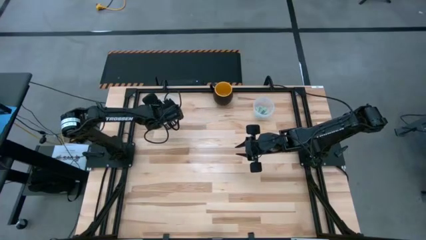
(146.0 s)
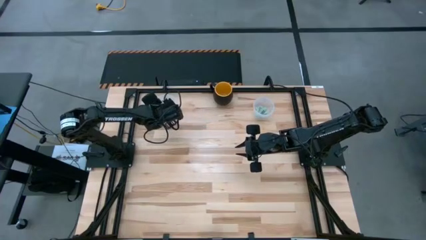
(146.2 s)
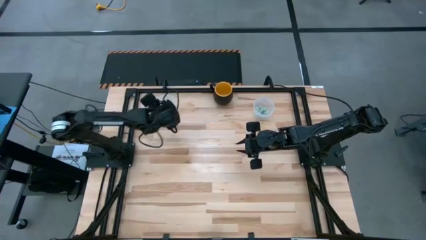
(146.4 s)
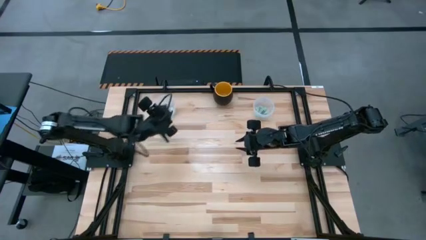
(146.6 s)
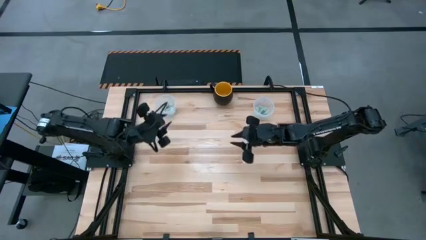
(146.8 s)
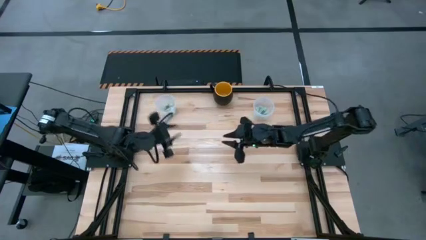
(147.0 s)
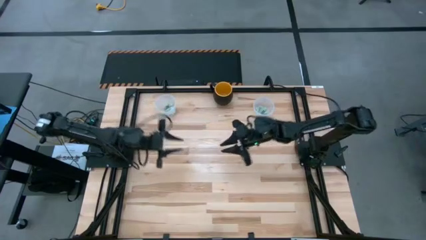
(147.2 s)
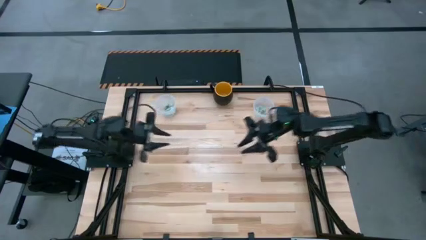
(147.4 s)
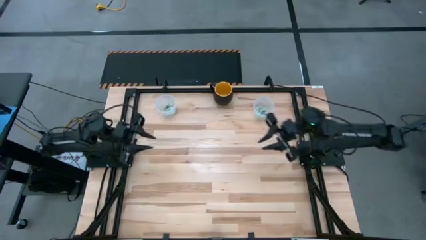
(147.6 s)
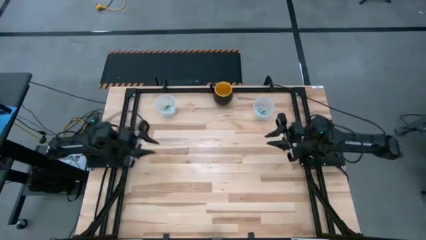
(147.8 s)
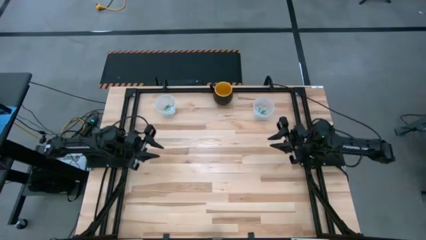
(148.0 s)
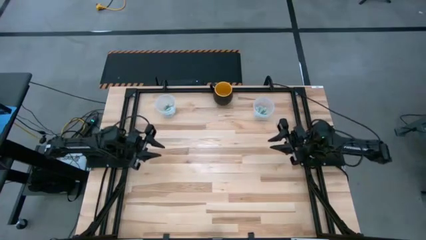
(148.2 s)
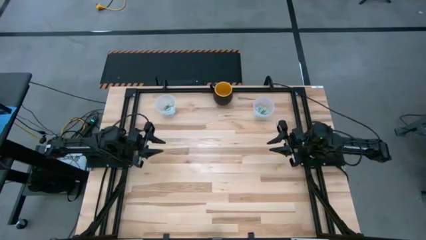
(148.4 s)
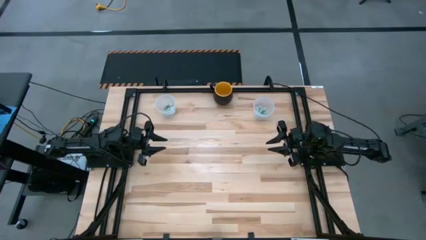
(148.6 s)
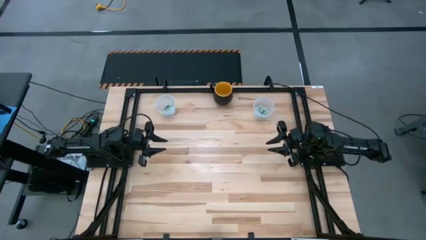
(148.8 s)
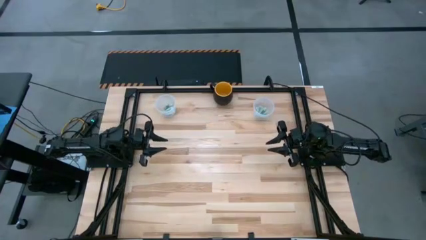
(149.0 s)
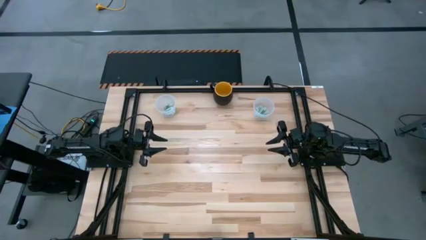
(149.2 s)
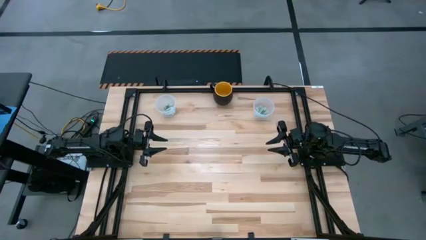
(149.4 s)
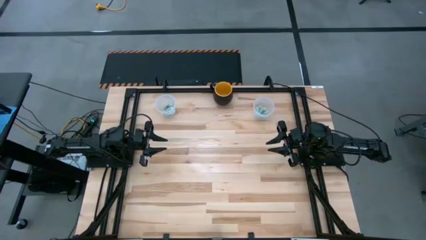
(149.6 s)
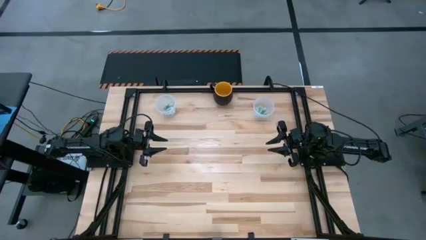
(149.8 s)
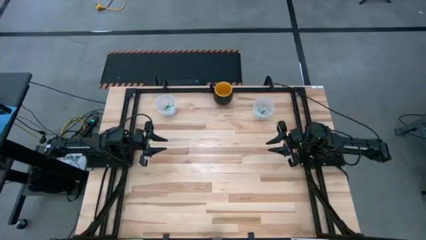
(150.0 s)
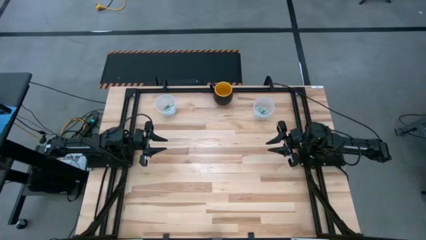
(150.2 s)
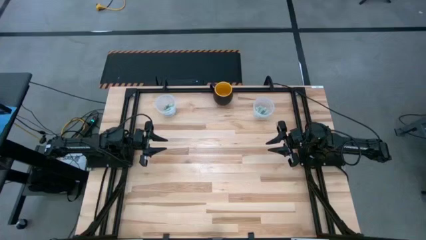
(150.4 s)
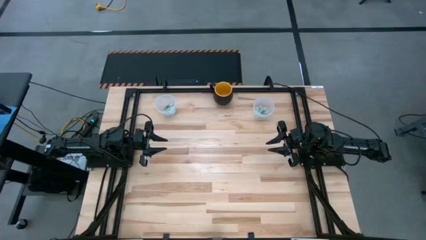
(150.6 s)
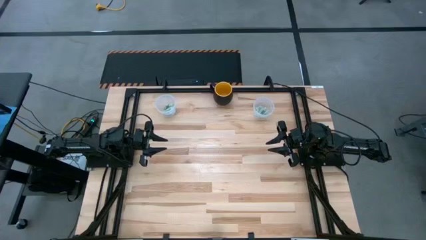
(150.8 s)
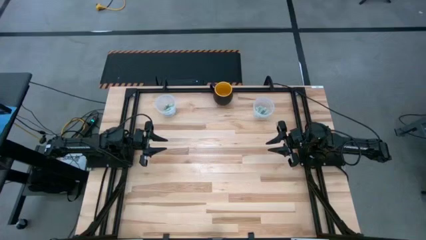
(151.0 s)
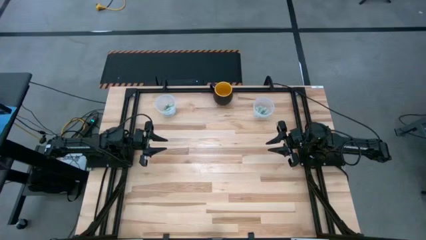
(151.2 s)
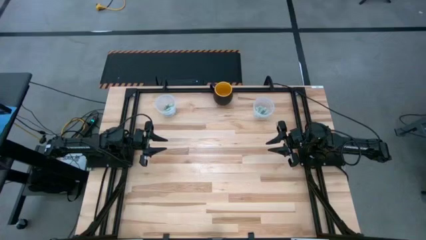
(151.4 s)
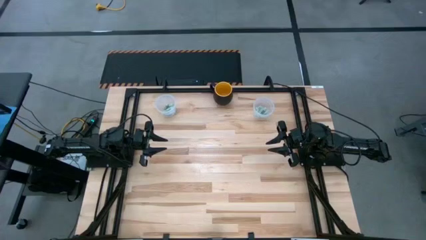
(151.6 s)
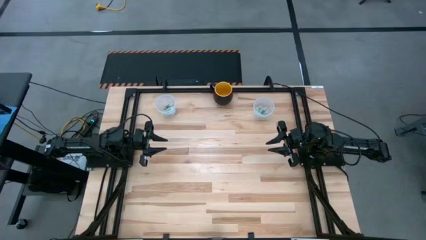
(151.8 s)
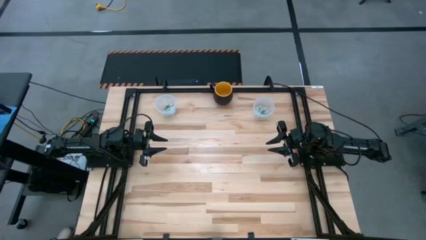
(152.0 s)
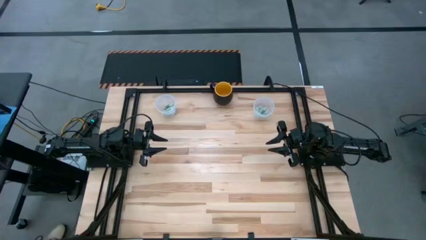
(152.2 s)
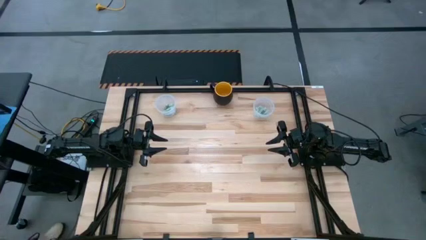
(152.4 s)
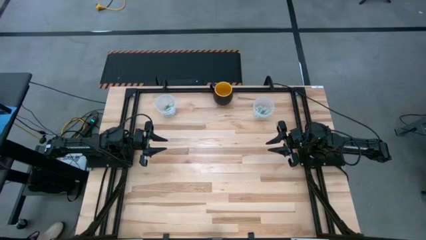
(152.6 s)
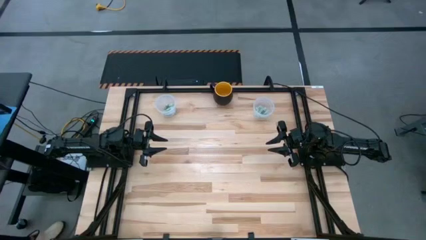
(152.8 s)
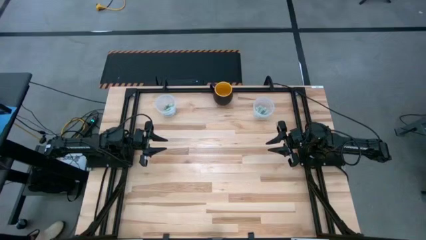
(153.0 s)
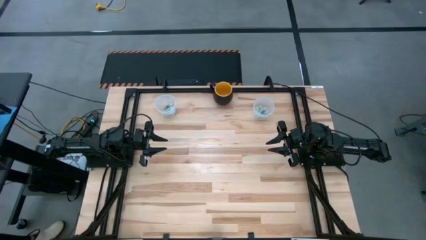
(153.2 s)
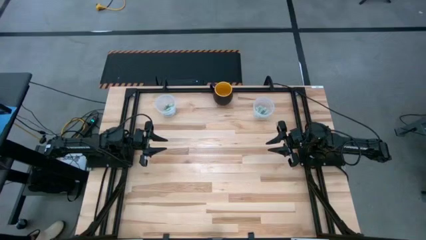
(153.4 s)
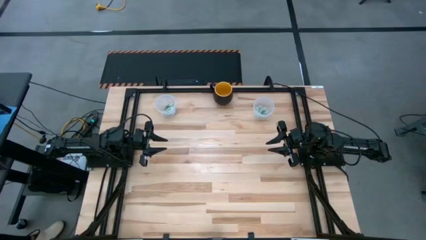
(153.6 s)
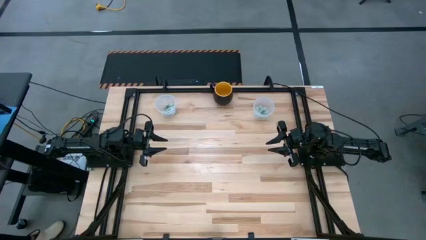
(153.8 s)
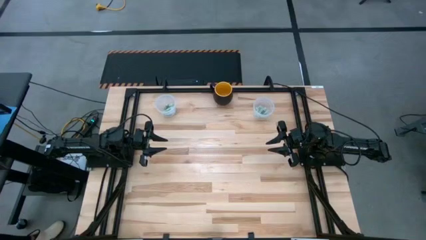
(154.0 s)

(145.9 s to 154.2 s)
Task: Pick and place Stevia / Truvia into bins
Return to Home Position

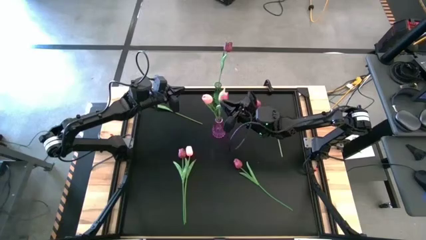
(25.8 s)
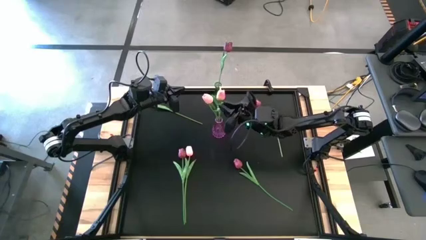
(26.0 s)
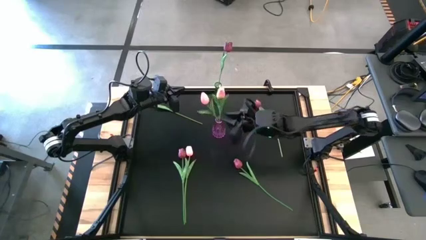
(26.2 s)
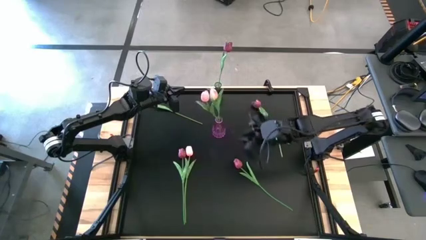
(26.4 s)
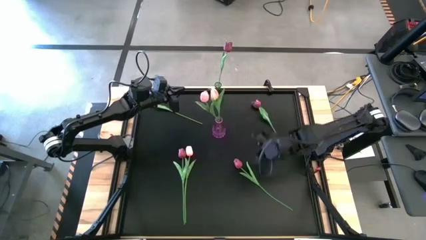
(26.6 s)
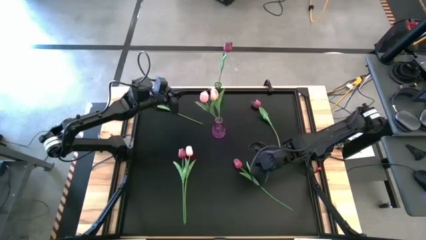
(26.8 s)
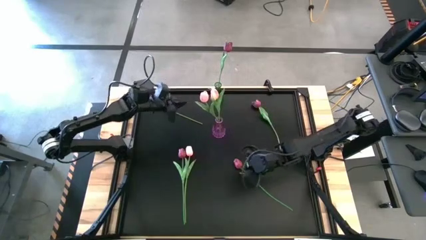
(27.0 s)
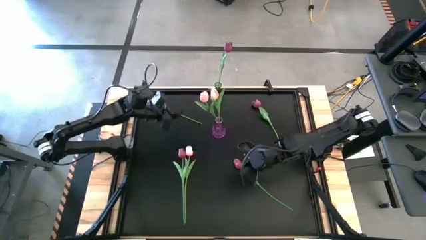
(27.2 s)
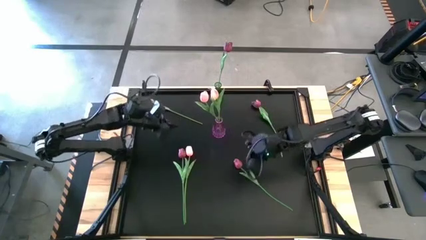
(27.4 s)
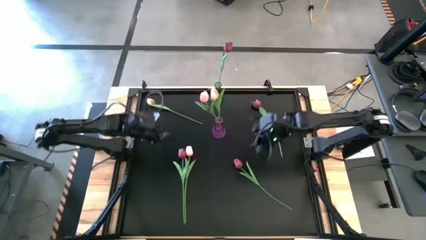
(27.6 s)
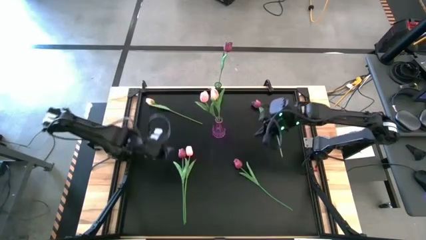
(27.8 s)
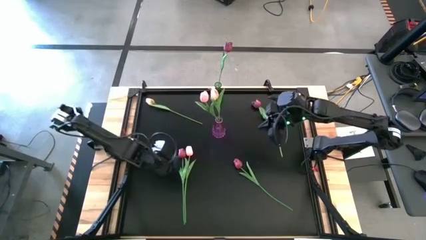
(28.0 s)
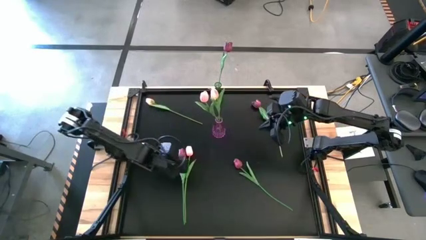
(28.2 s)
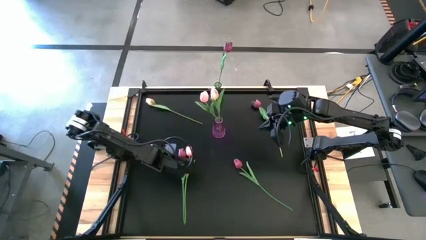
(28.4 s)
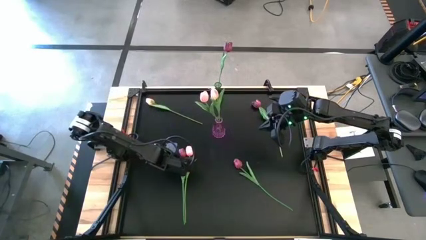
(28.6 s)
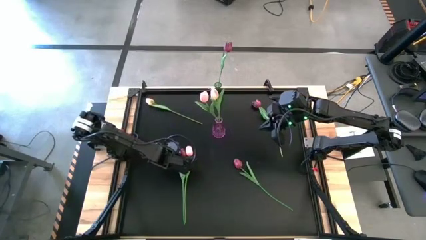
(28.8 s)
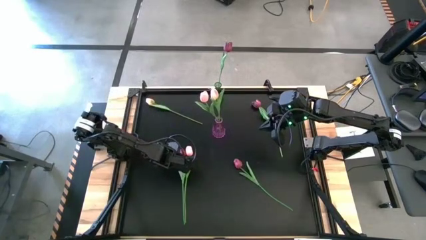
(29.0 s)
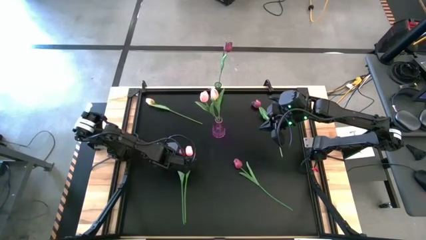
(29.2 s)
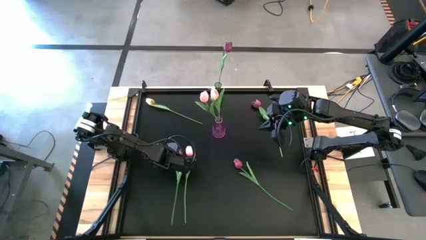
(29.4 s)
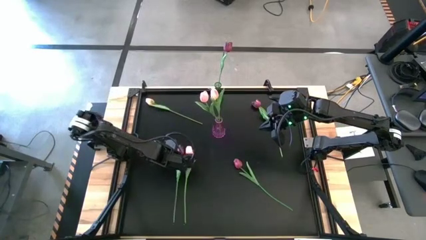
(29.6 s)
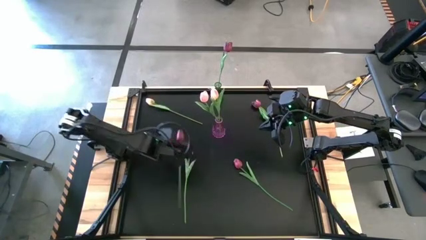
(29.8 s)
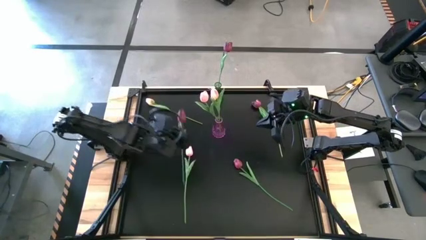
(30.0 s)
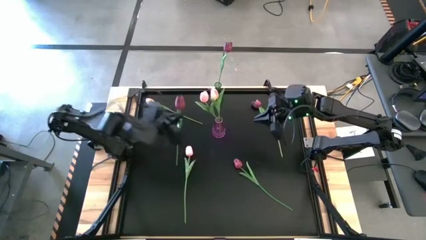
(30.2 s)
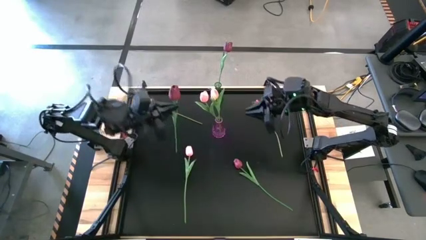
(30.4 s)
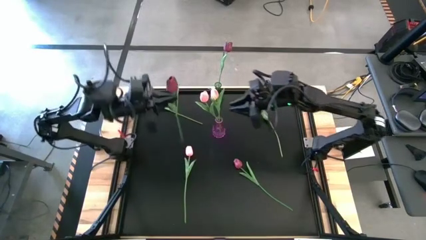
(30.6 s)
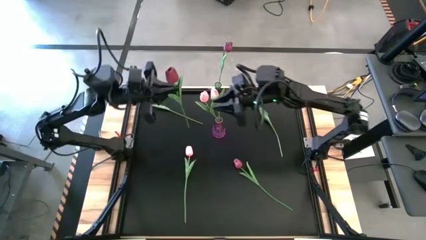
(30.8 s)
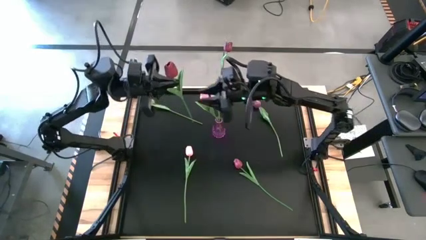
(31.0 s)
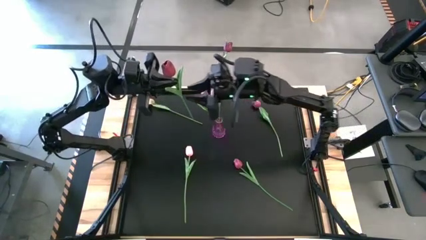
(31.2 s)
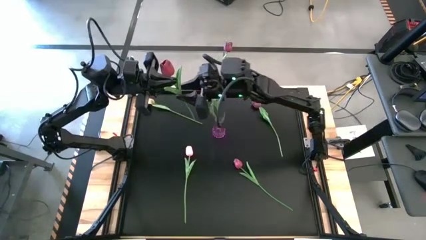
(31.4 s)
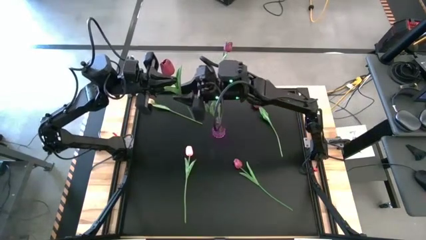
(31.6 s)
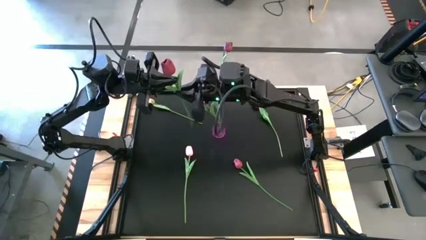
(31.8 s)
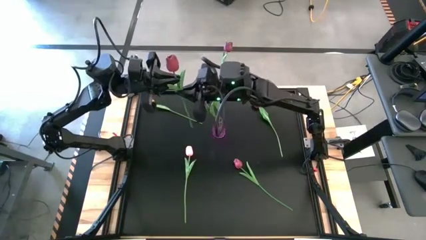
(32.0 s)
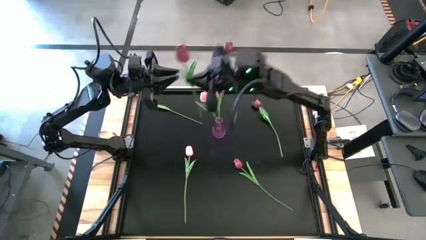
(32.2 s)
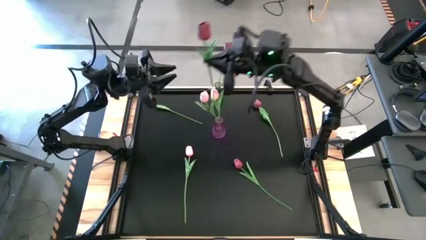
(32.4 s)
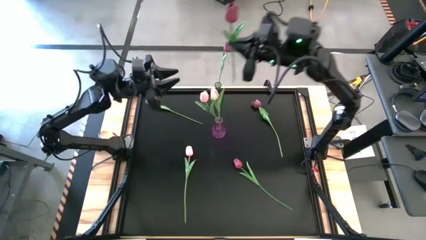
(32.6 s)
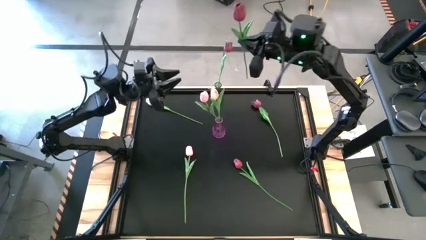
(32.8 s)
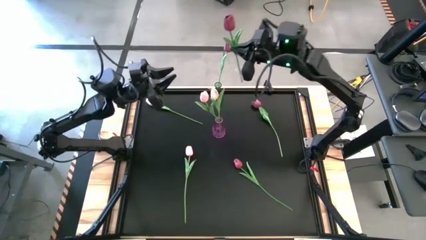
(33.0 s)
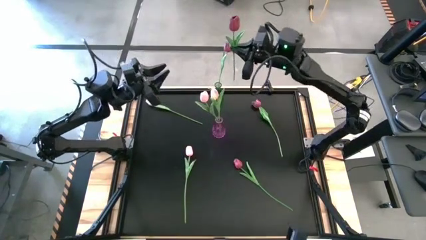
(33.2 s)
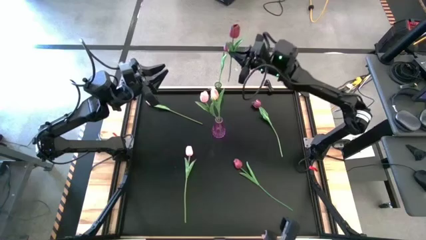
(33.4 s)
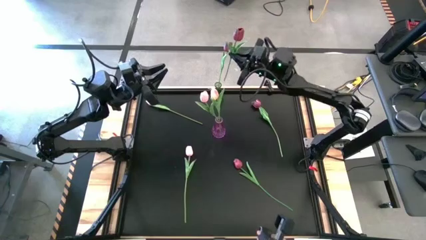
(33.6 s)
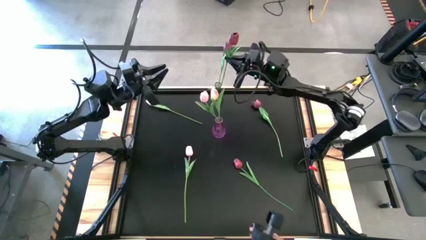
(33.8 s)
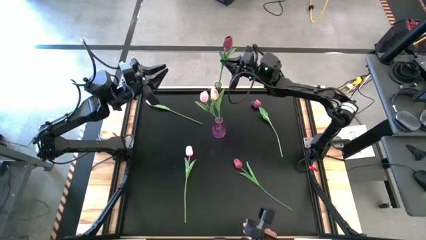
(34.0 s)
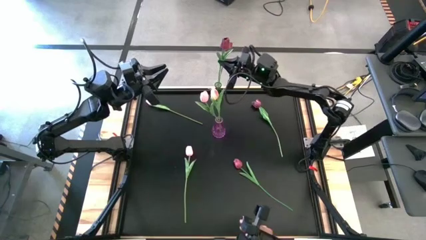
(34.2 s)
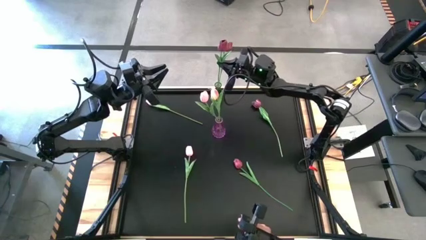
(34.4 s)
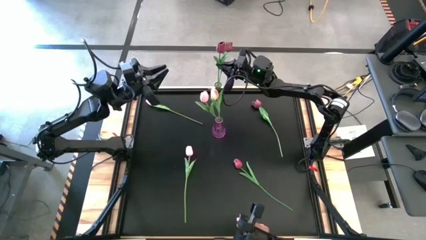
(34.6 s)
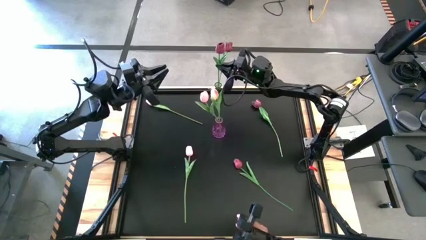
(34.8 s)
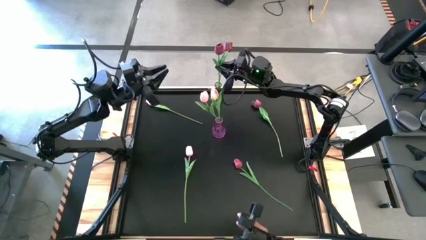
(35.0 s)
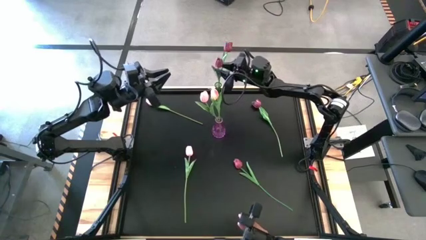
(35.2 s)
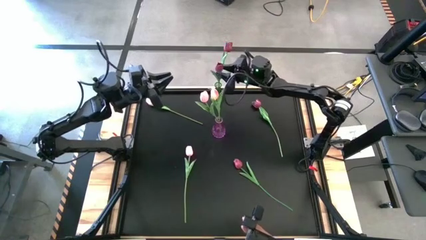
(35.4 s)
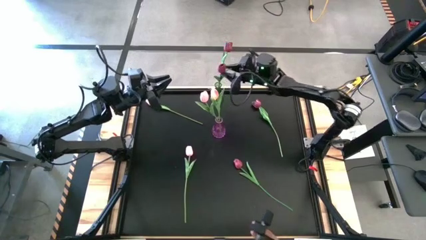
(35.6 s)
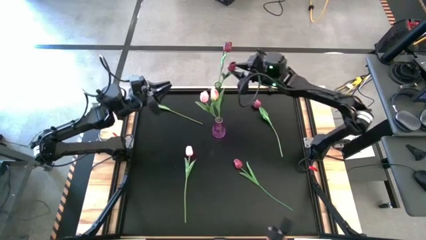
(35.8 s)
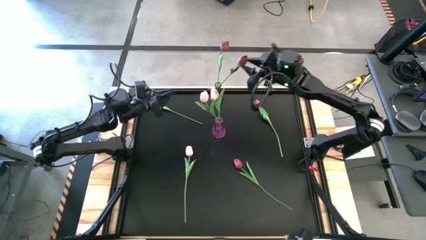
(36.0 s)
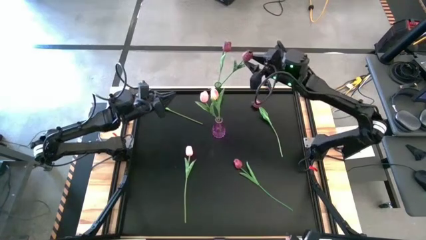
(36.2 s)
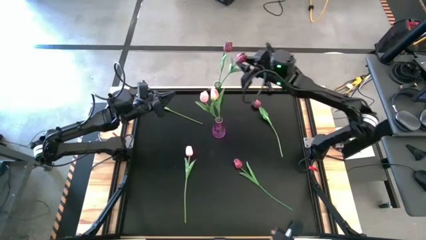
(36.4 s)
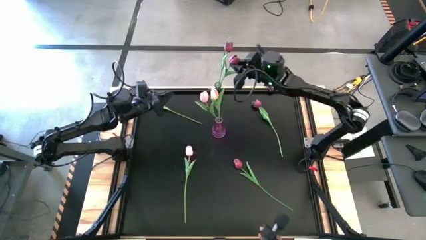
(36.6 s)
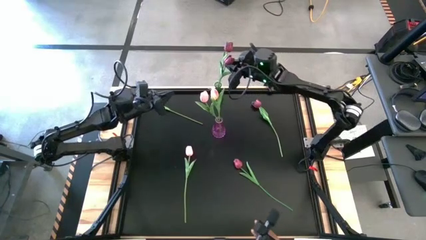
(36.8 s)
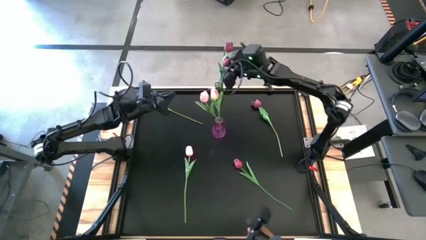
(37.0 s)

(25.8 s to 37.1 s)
Task: Sort flowers into vase by color
Put the bottom left red tulip into the green vase
